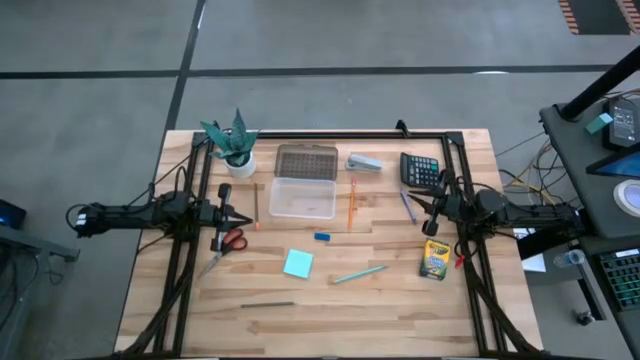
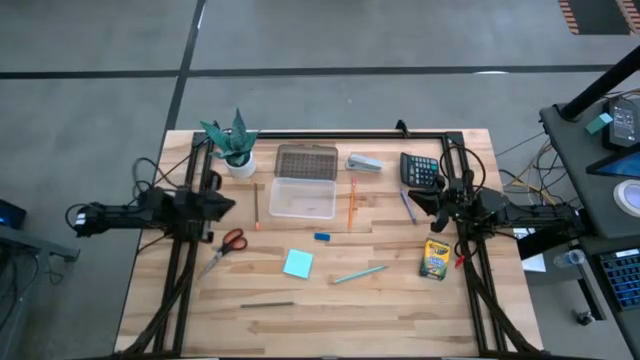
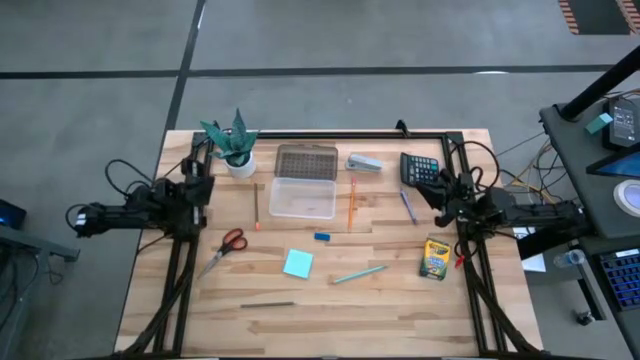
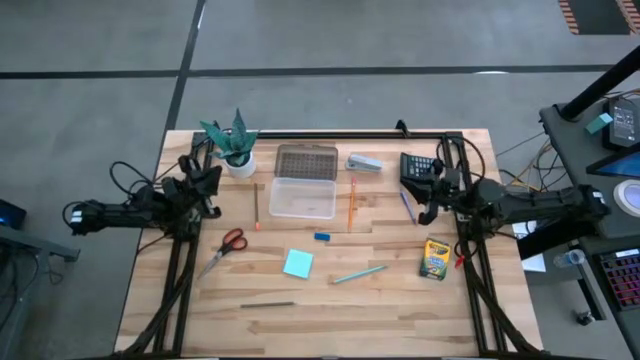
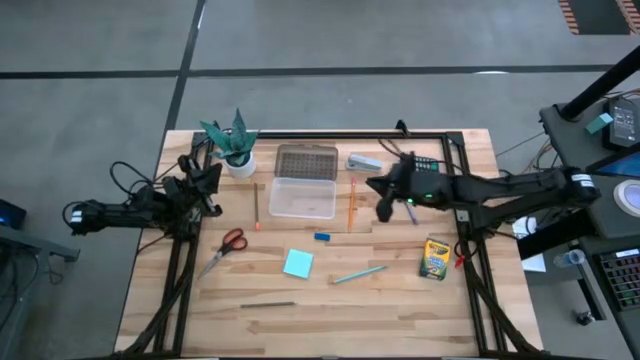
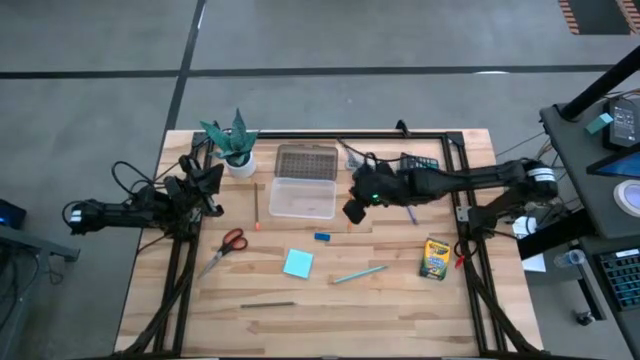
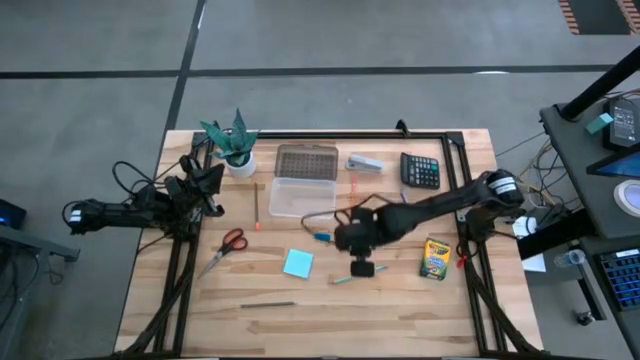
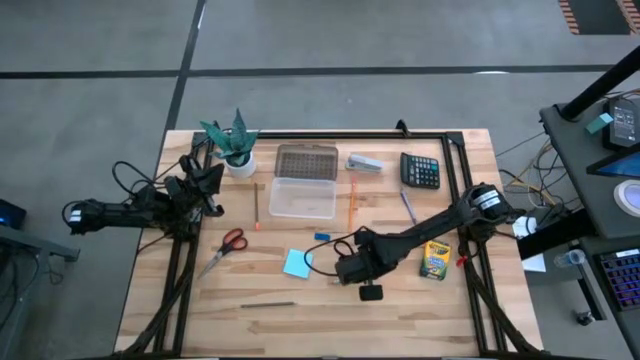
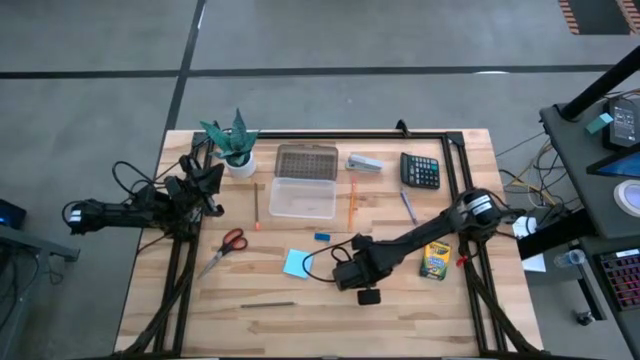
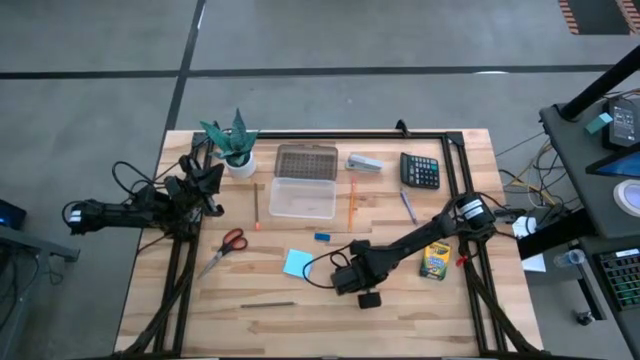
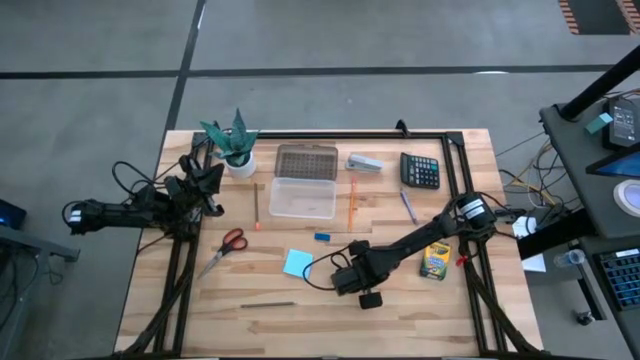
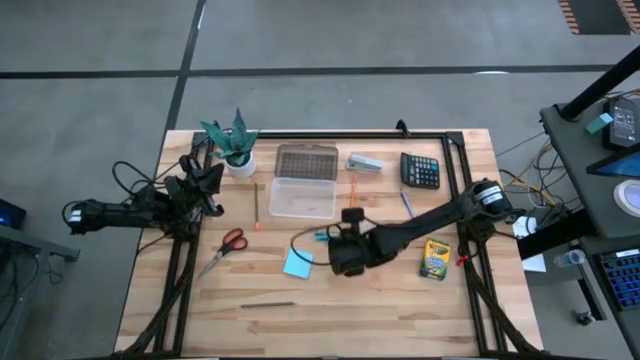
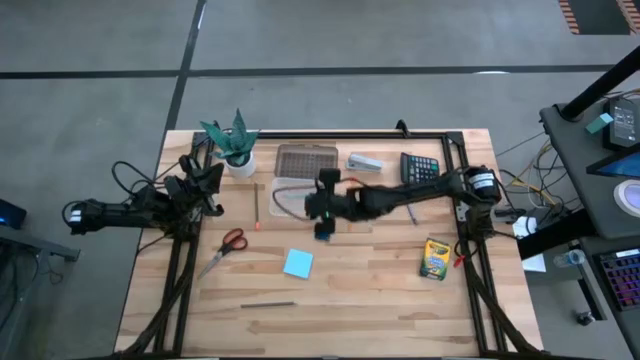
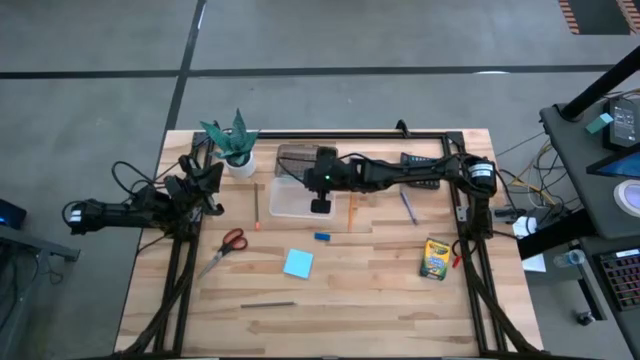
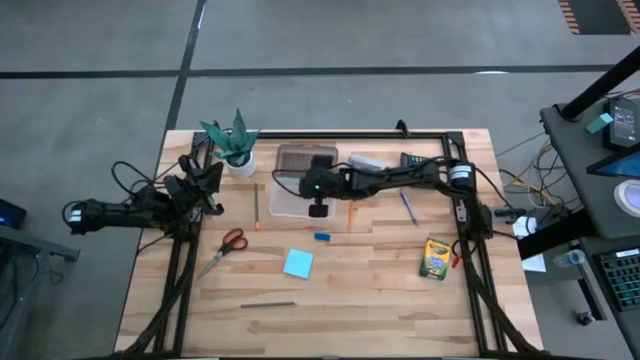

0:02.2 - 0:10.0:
Task: Pack school essentials
Put the light blue pencil into the supply box

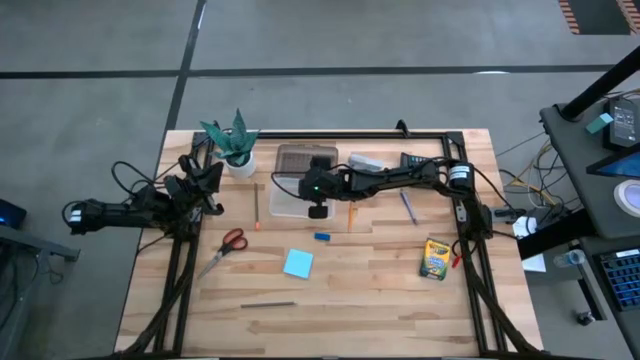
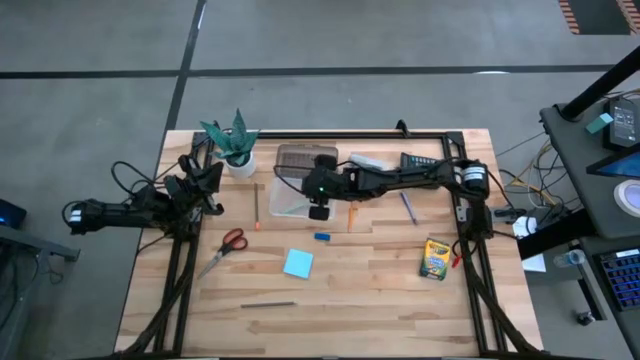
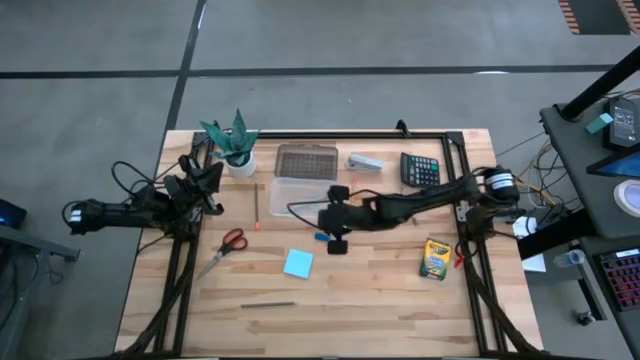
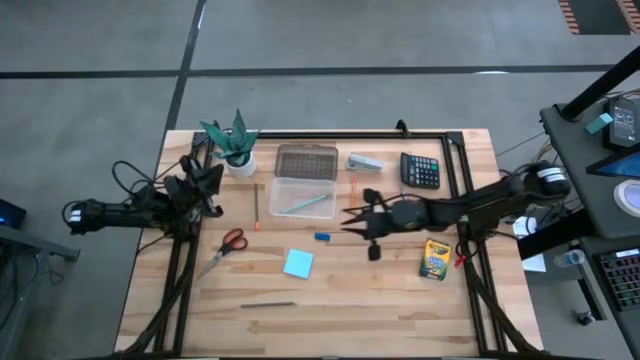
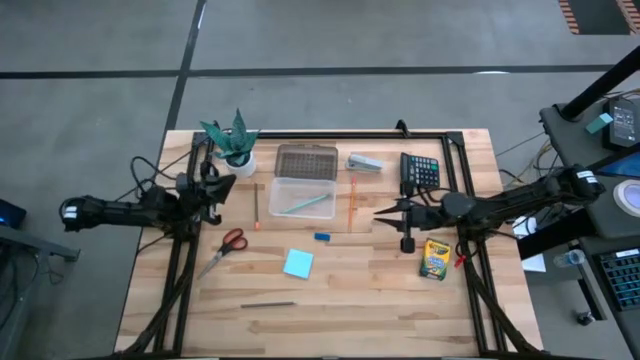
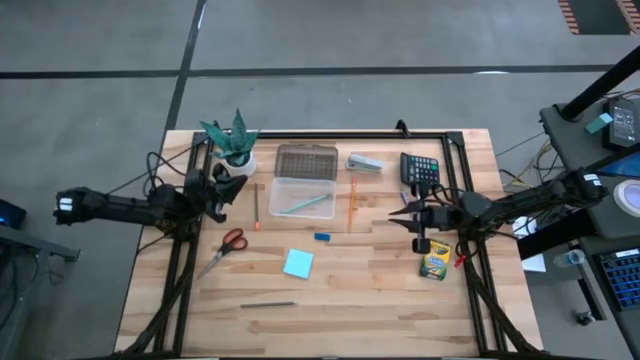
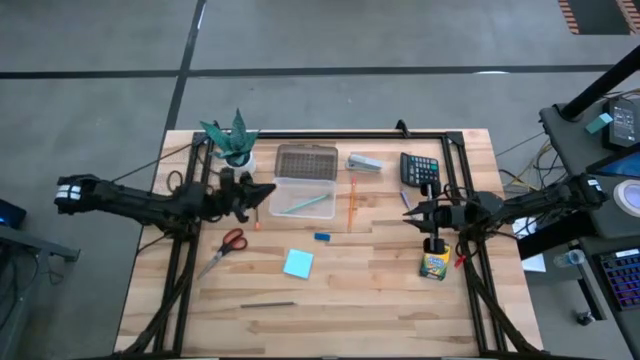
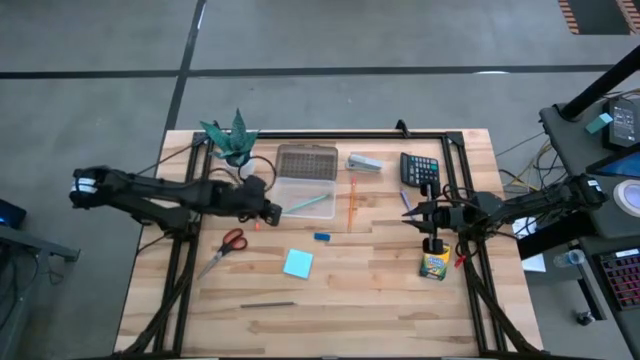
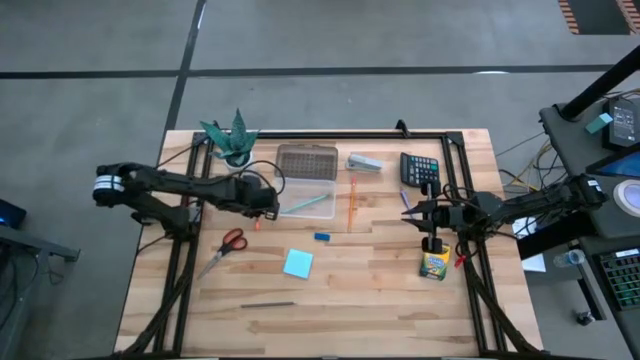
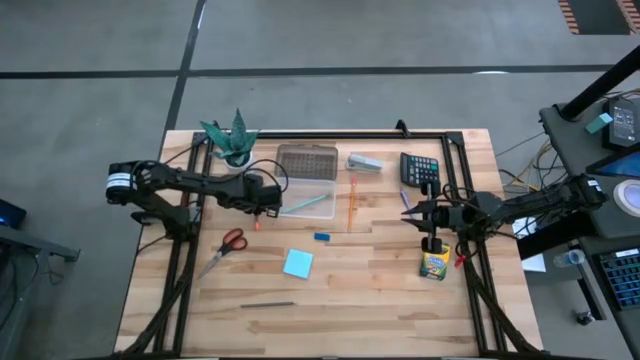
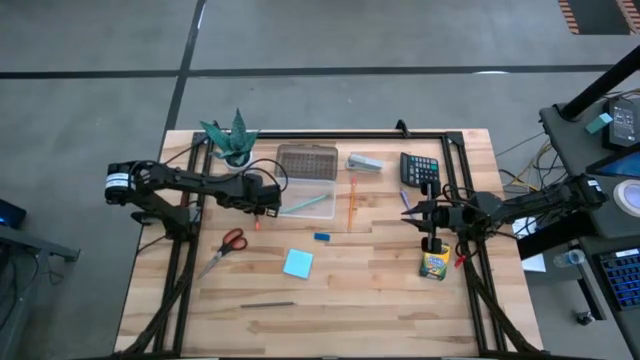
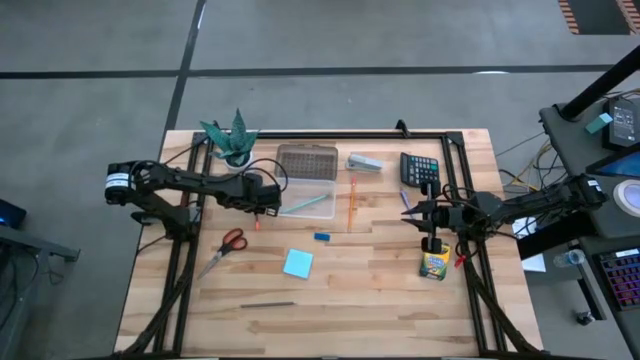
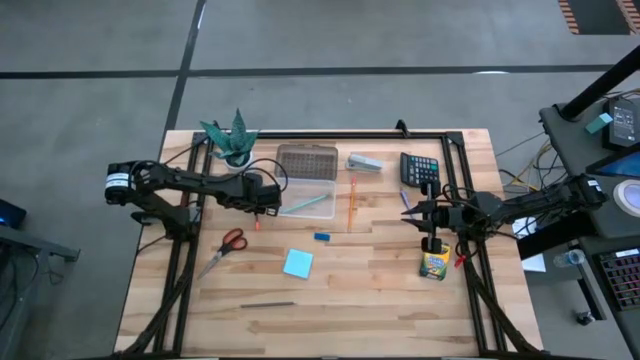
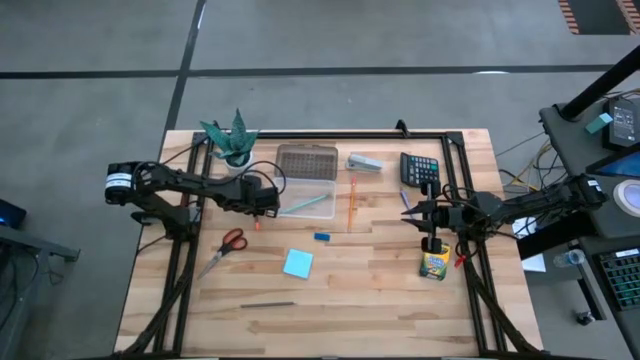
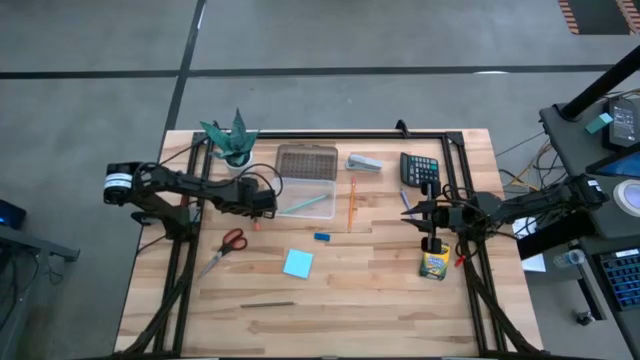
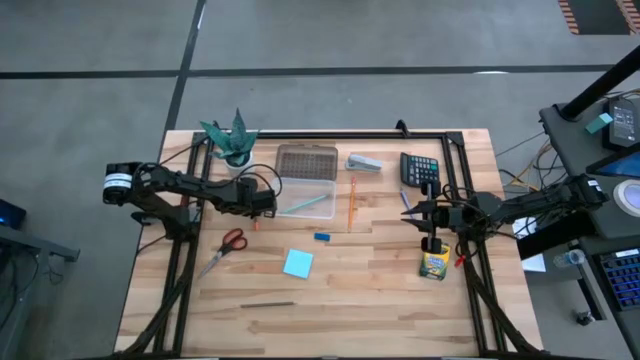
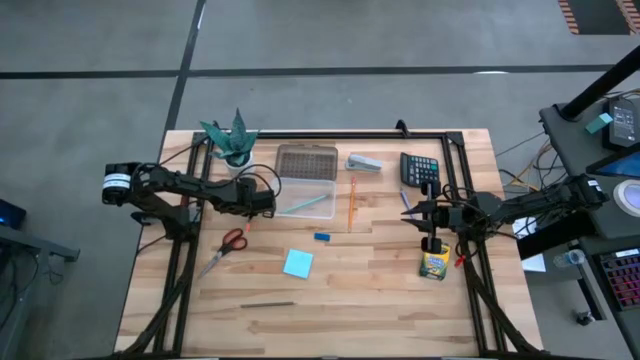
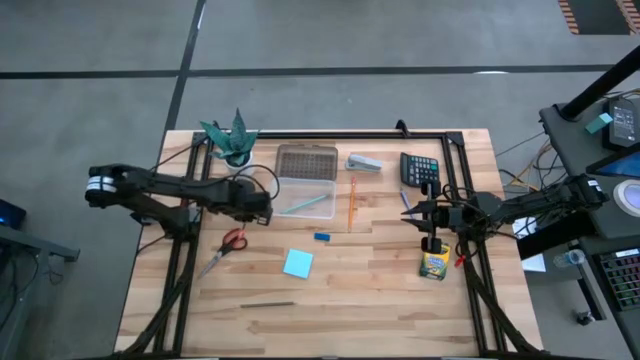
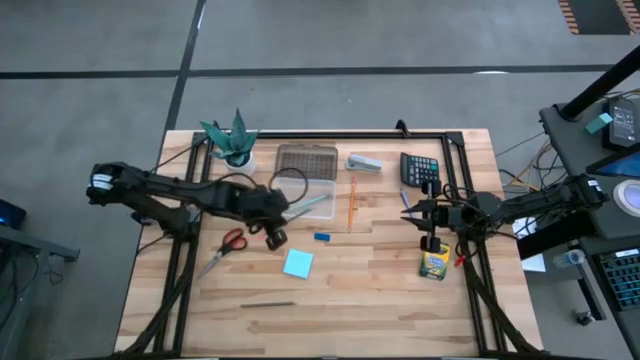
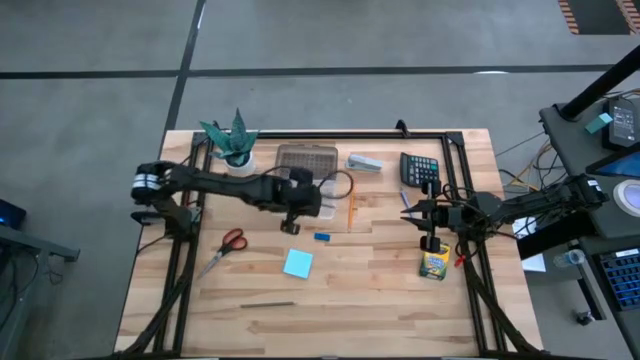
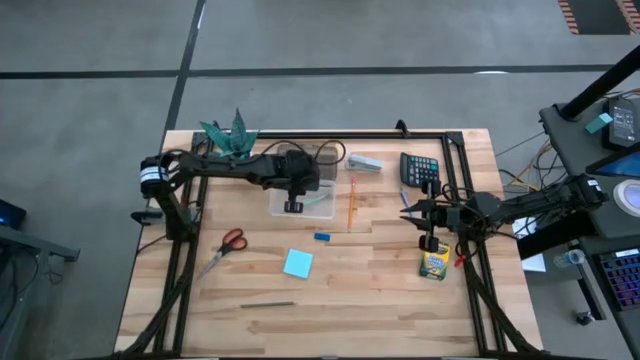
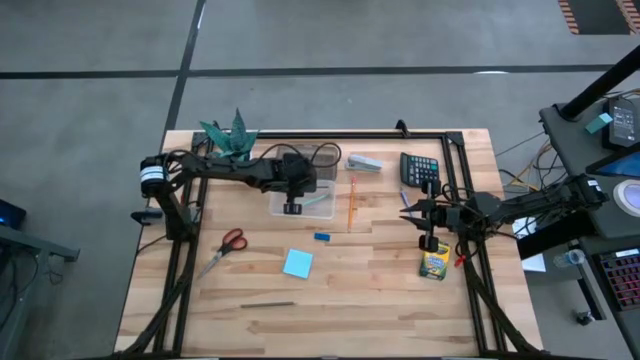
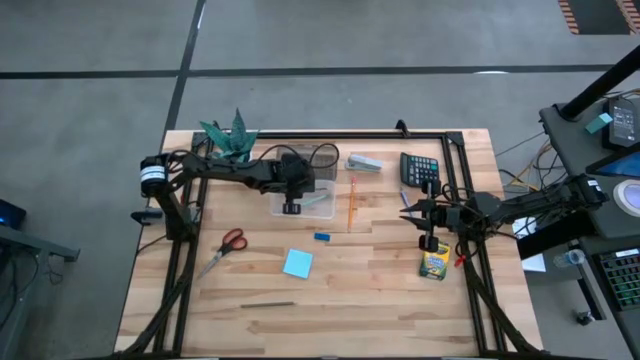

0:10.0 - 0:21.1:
Put the top blue pencil into the supply box

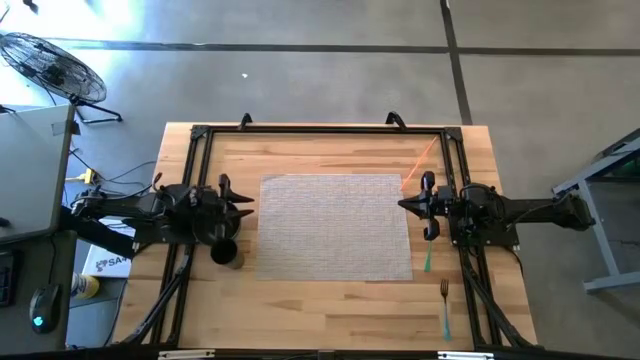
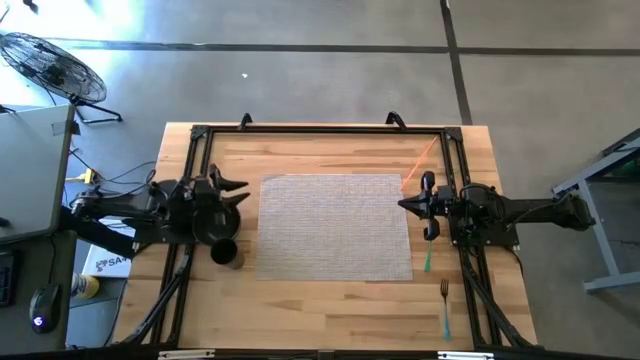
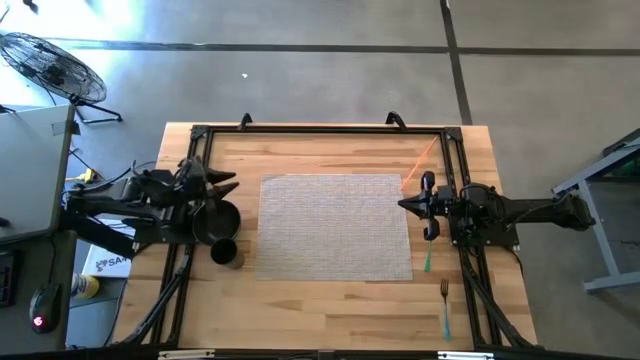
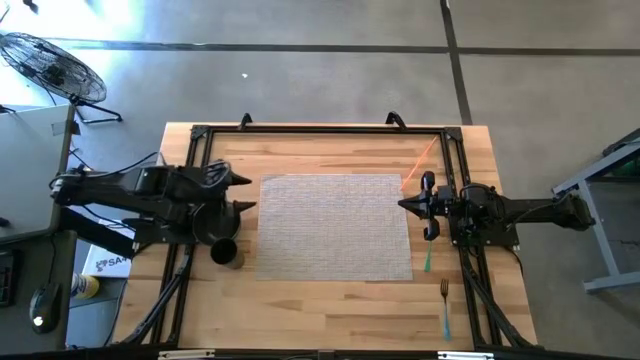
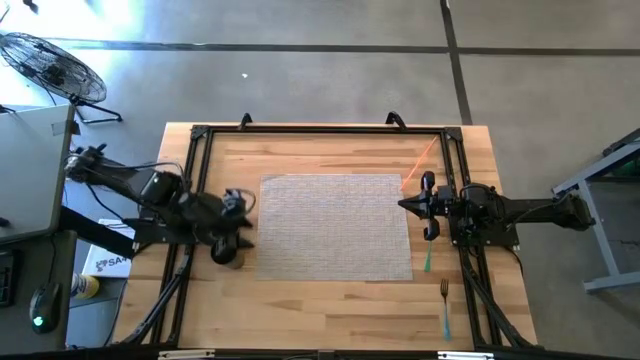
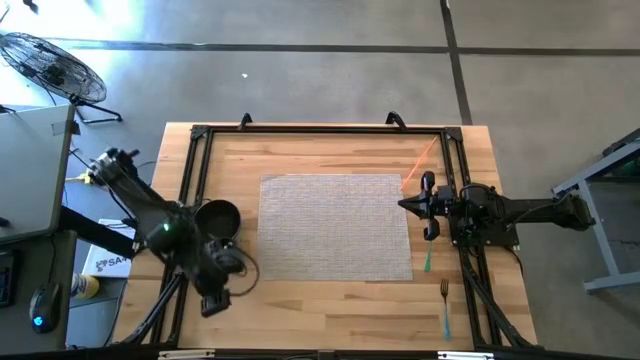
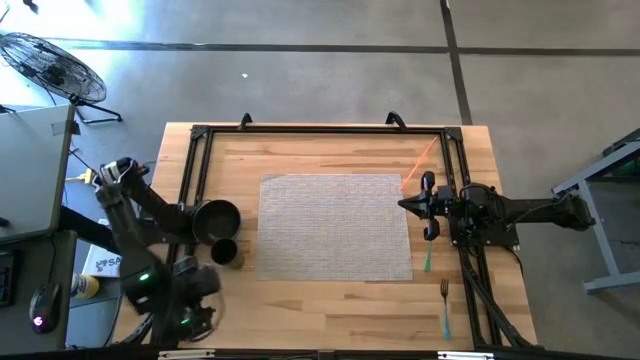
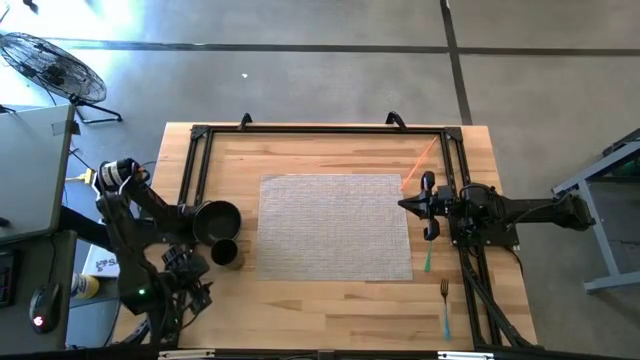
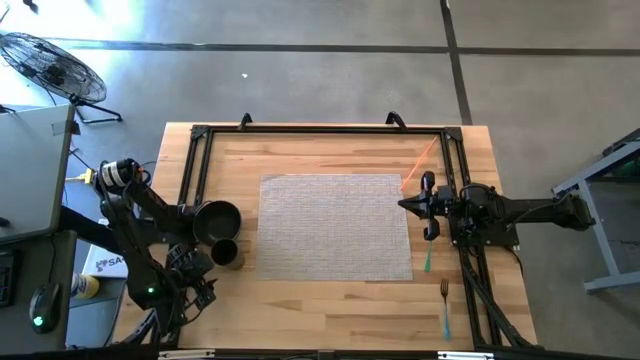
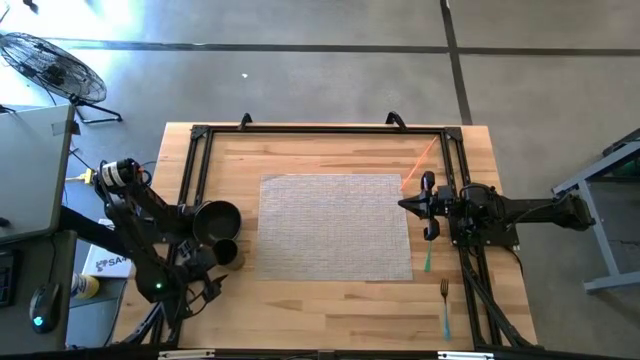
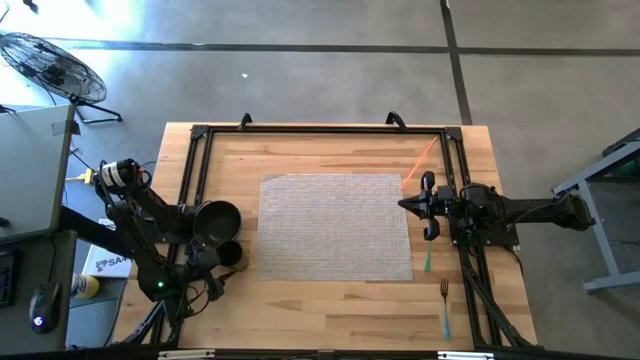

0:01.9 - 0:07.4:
Task: Pick & Place Utensil
Put the black cup on the top right of the gray mat
